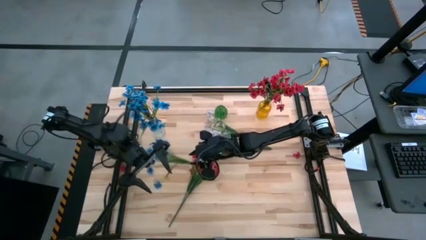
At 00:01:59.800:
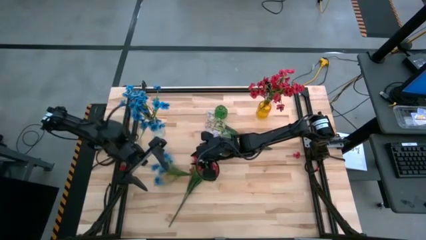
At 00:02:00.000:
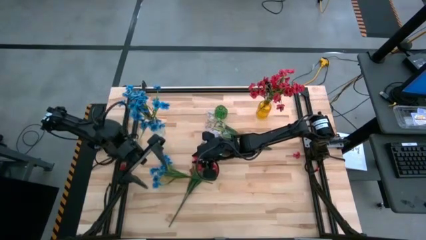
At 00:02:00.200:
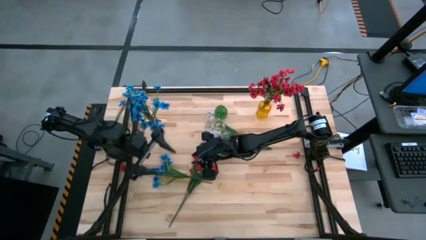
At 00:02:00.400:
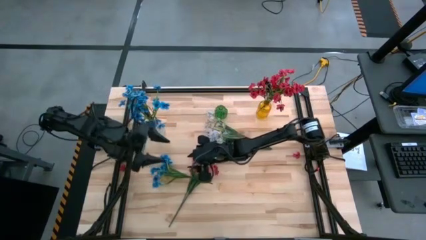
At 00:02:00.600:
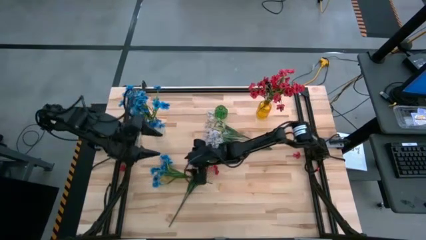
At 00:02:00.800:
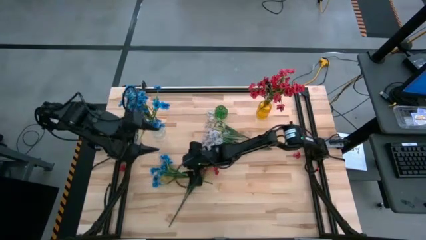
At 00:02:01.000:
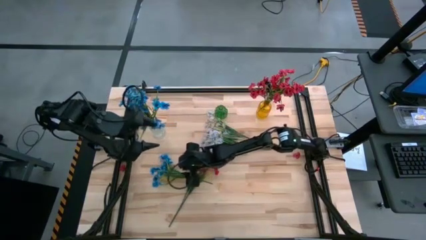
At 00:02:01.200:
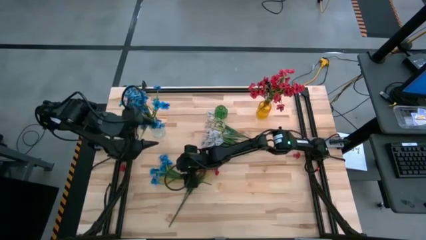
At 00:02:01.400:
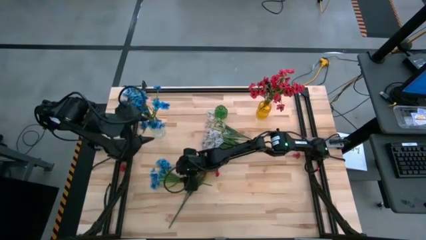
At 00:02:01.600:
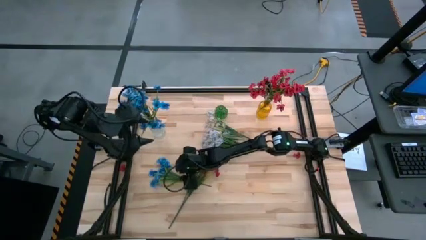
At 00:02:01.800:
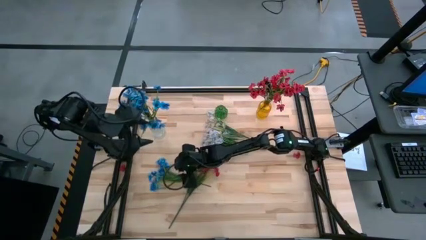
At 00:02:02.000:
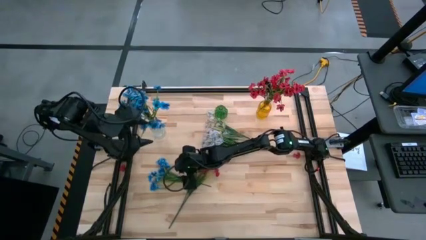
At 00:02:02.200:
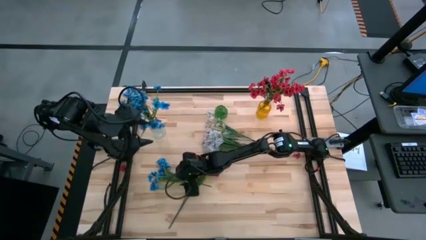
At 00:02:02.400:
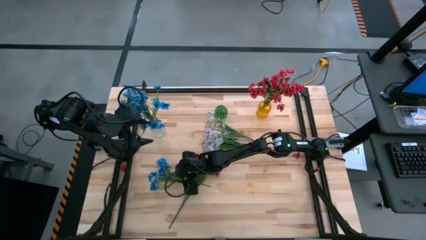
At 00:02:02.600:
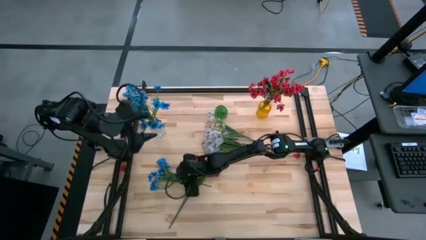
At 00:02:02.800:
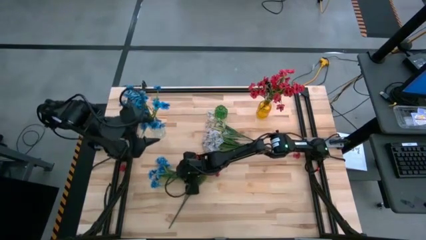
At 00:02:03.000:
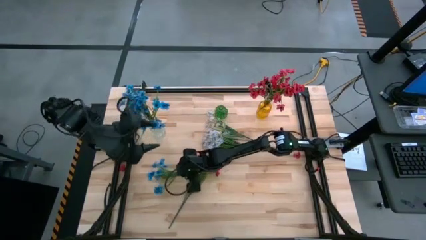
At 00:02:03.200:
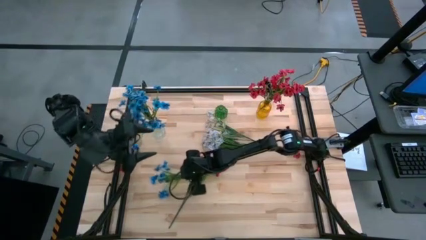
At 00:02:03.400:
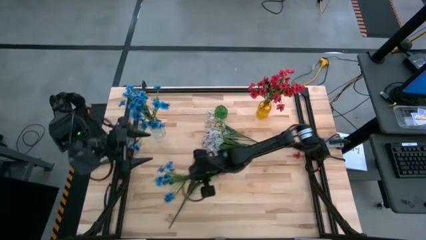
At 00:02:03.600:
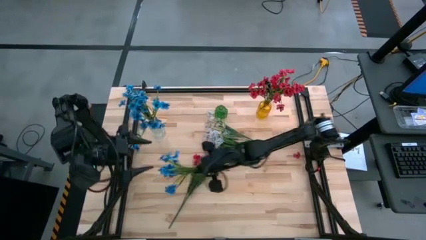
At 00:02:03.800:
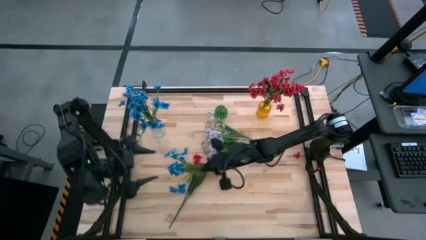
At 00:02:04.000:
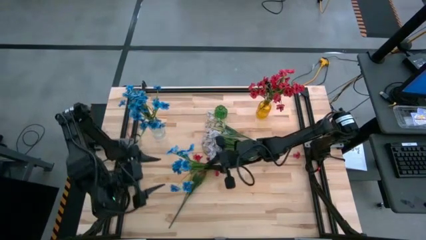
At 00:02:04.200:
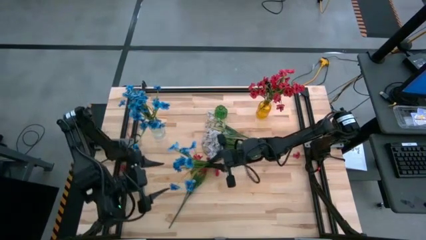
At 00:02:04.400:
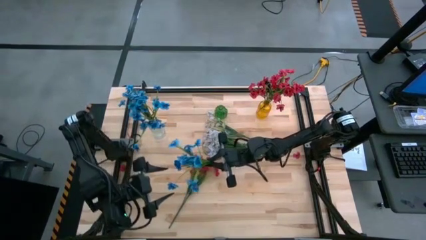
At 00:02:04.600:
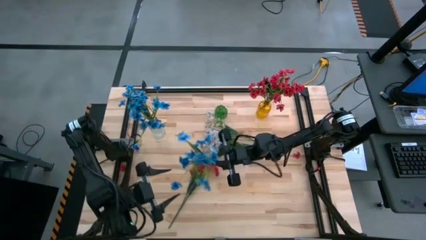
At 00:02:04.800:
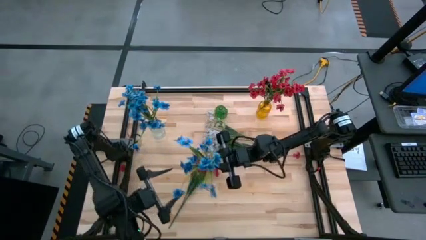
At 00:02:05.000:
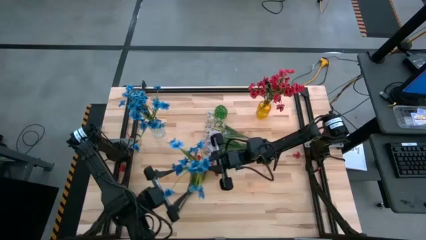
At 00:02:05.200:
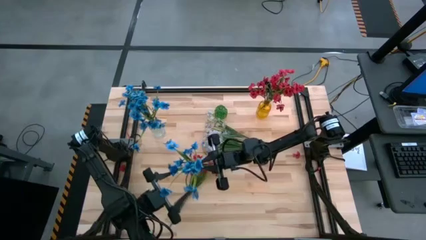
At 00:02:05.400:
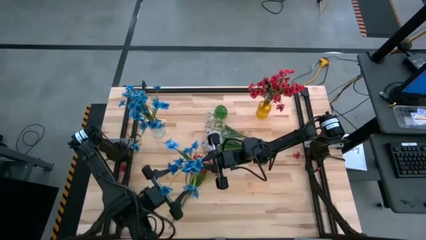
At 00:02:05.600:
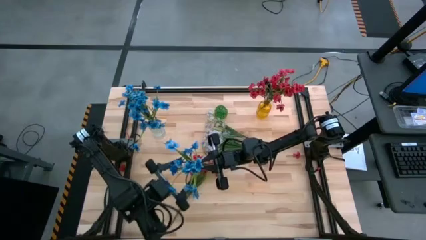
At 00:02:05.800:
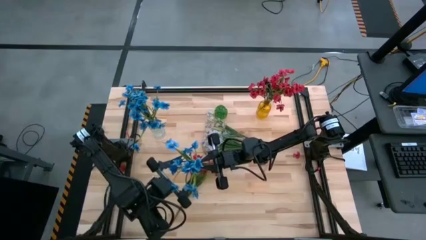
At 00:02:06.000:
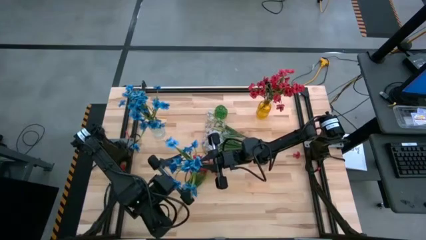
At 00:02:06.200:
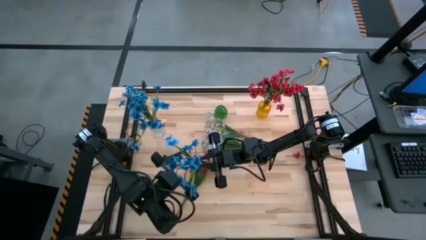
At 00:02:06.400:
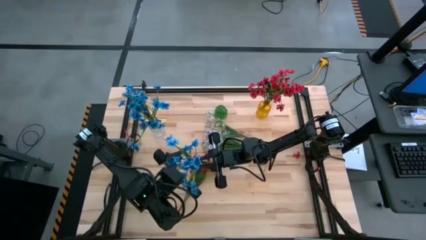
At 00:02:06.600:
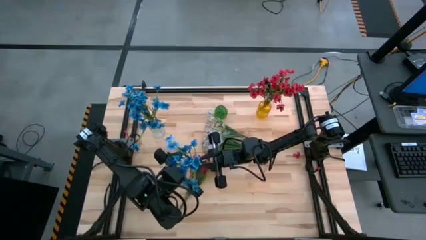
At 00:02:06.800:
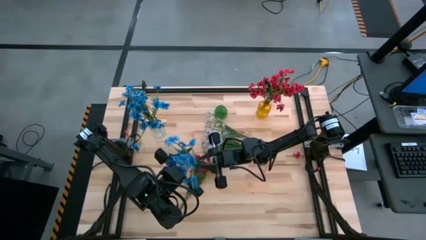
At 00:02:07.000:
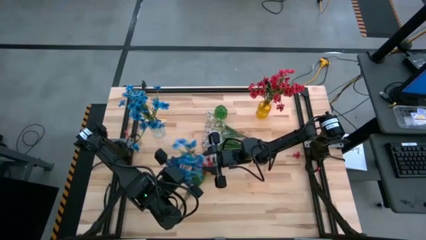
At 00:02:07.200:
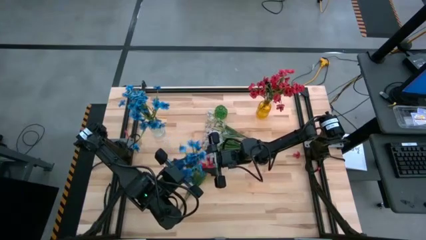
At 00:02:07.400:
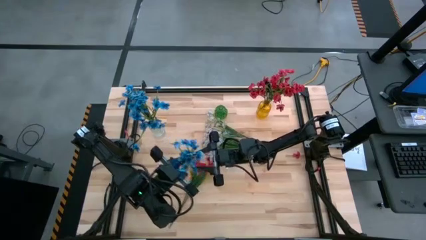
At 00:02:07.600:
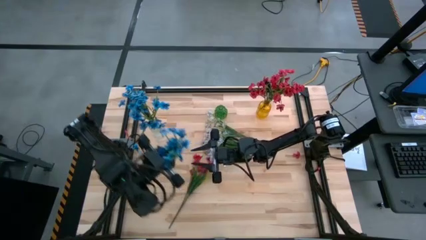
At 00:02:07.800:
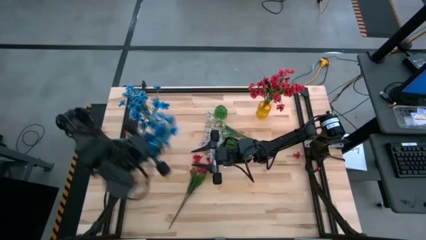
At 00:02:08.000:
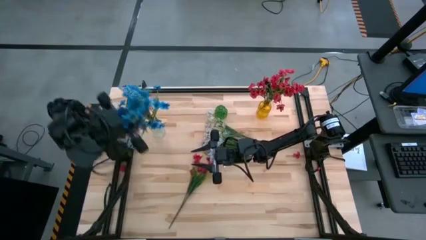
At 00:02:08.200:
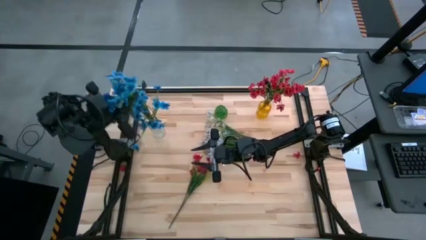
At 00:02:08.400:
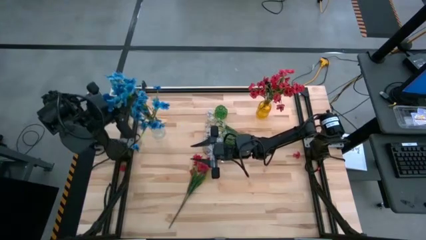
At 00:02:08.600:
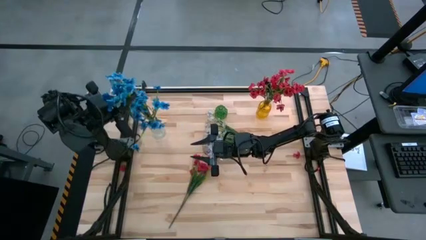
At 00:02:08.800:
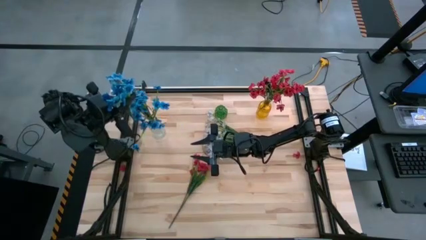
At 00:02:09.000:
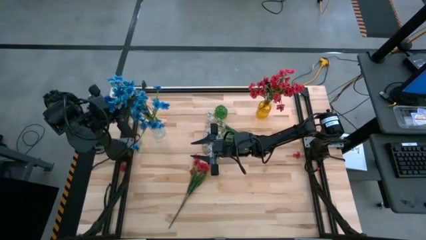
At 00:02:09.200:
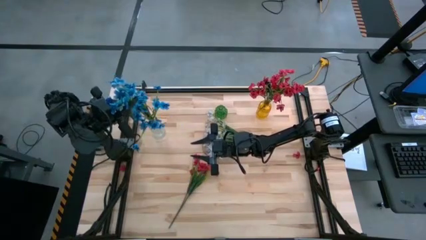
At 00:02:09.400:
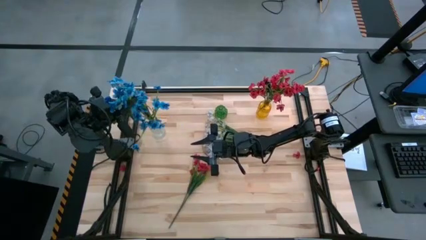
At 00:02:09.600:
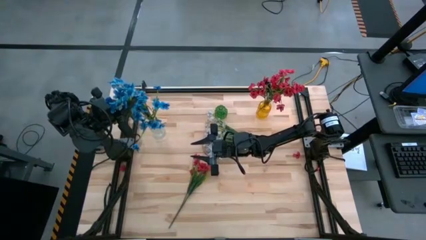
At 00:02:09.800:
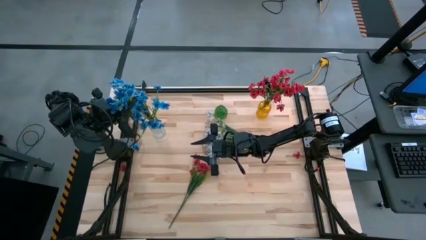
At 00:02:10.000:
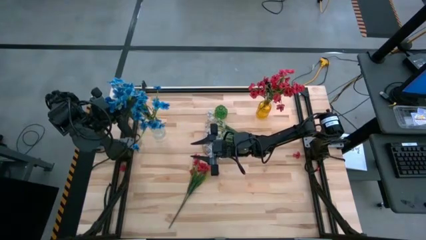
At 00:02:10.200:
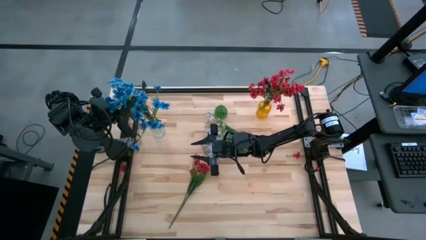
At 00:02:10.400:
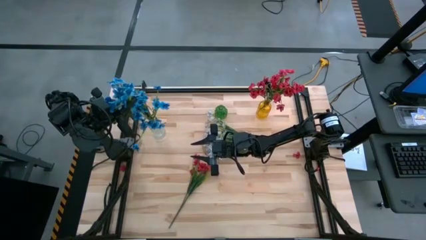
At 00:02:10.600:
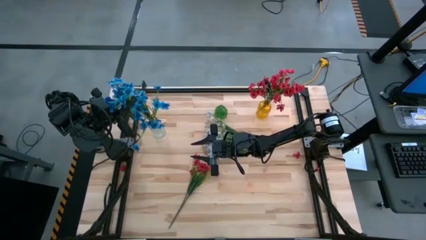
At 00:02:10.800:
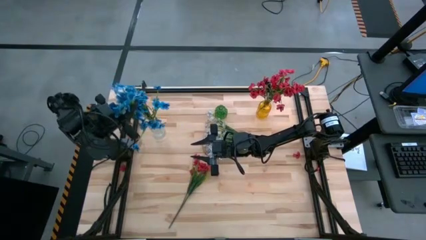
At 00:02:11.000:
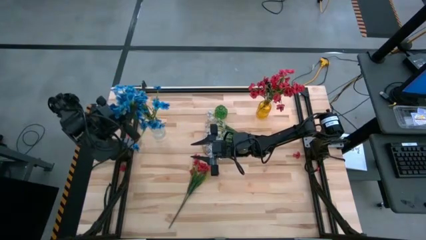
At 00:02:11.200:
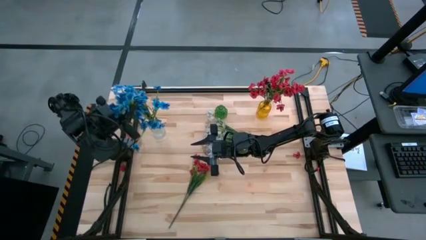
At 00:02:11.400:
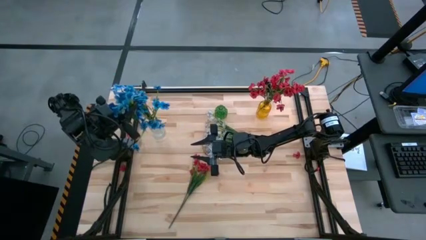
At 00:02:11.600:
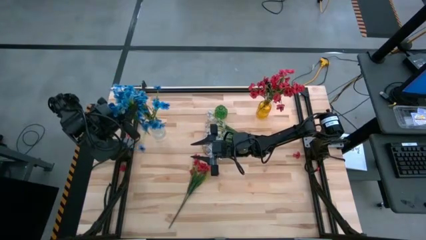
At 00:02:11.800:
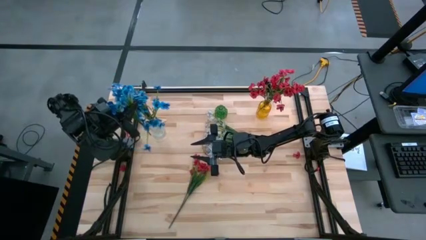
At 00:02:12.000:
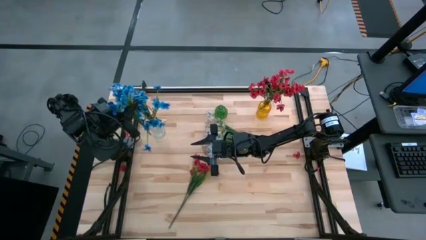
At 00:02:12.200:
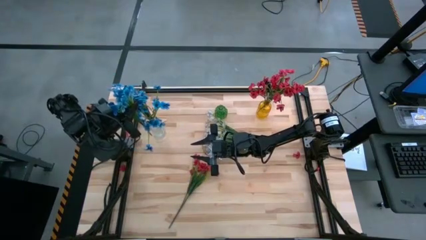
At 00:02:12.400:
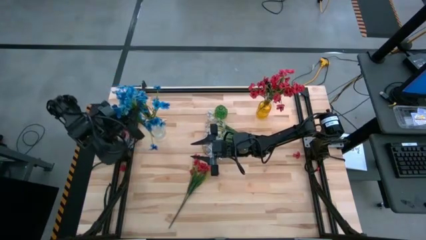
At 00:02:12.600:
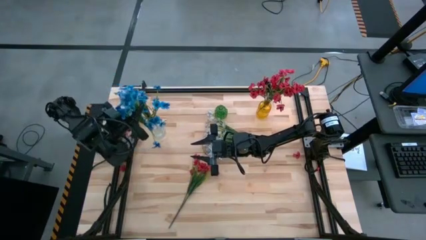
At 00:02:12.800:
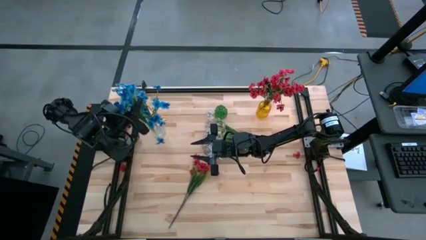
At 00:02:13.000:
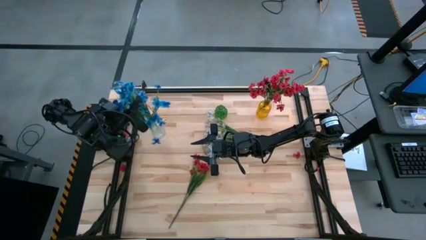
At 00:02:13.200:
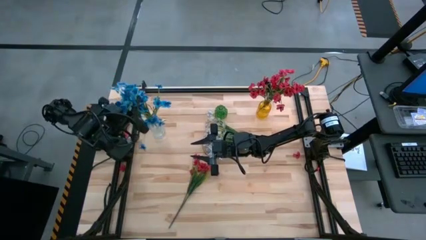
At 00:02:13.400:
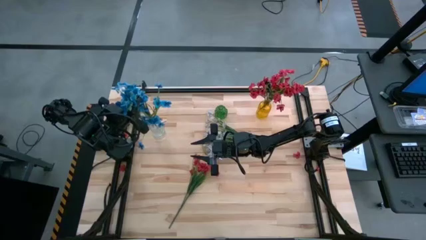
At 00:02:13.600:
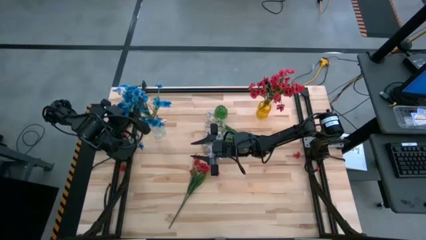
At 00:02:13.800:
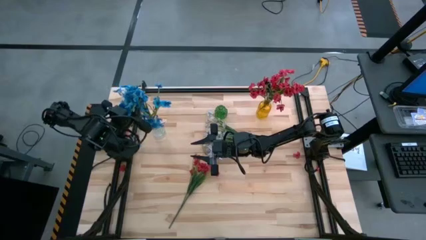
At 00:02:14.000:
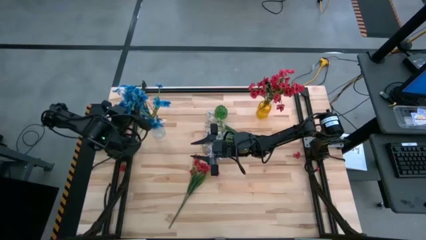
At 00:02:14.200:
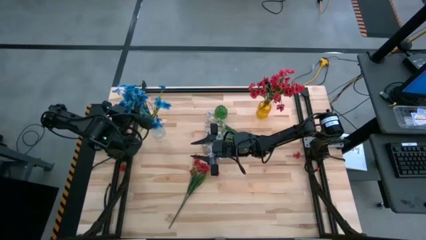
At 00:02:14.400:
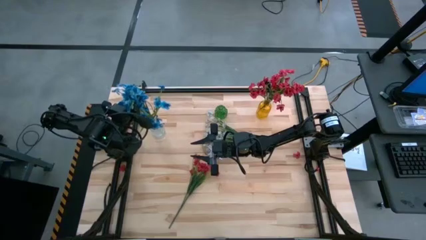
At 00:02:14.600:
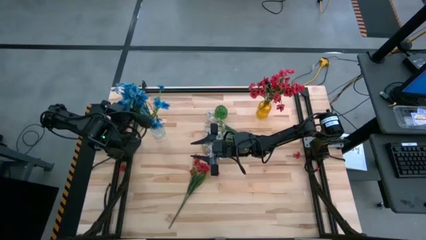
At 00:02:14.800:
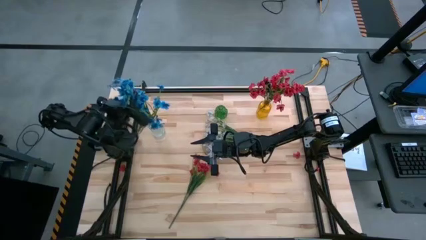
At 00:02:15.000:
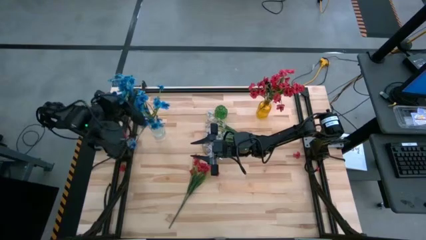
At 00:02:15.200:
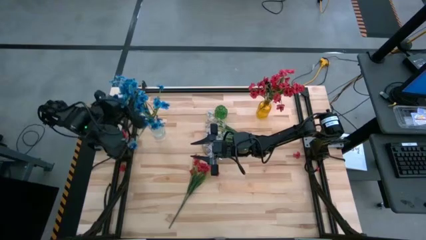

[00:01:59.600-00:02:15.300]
Task: Sort flowers into vase by color
Put the blue flowers into the transparent vase
